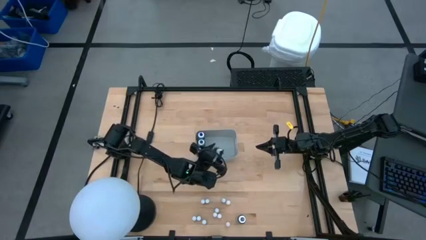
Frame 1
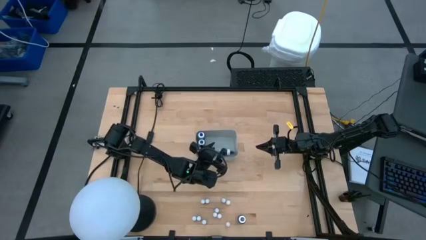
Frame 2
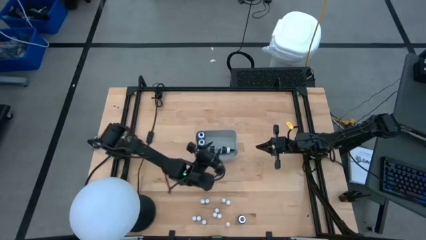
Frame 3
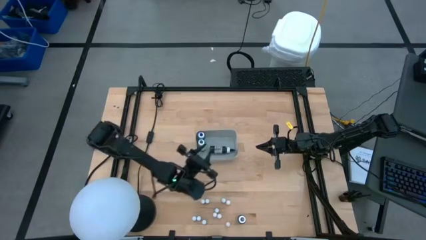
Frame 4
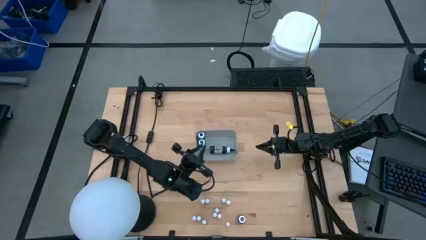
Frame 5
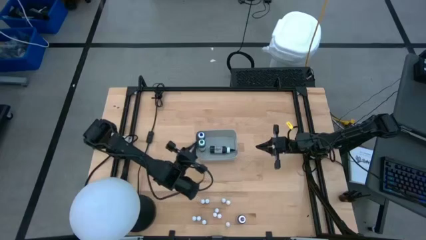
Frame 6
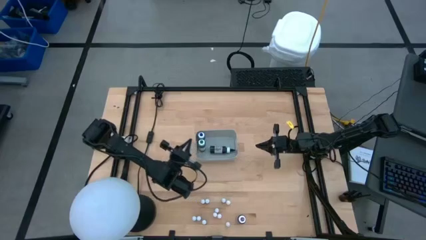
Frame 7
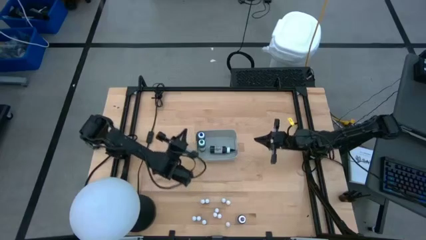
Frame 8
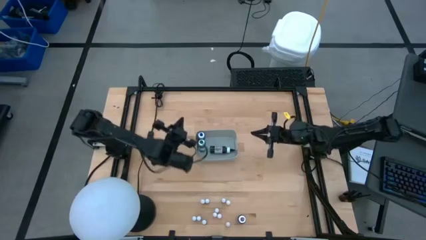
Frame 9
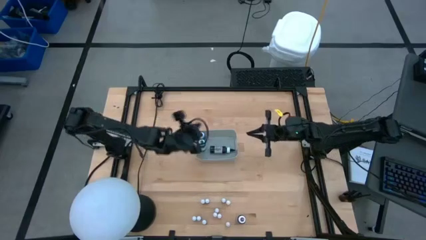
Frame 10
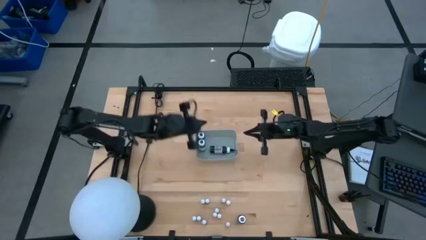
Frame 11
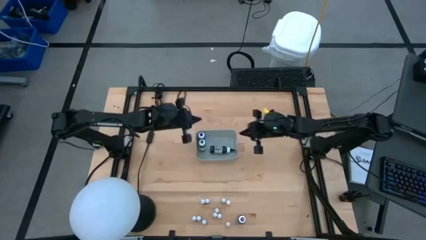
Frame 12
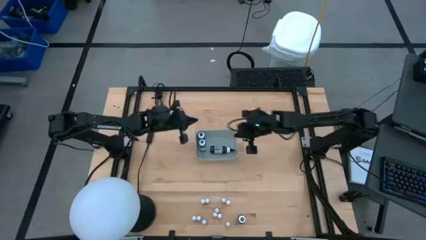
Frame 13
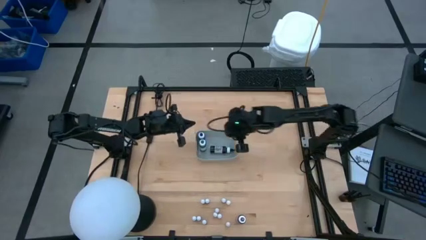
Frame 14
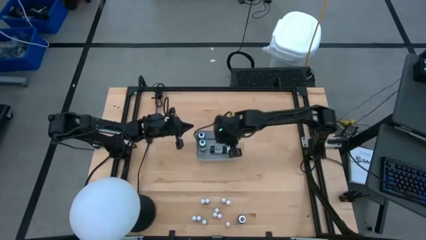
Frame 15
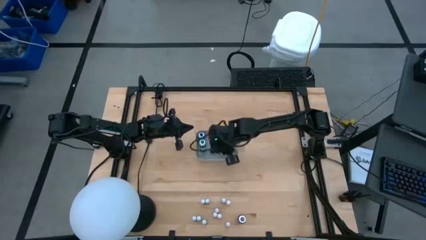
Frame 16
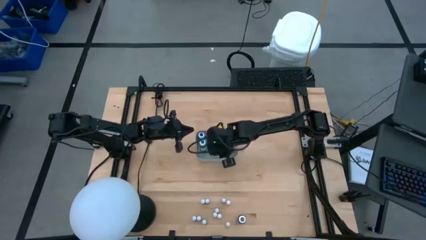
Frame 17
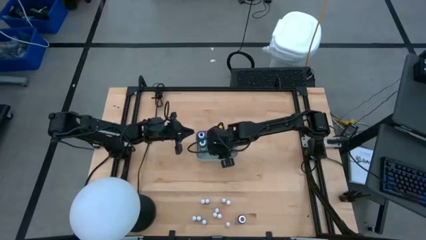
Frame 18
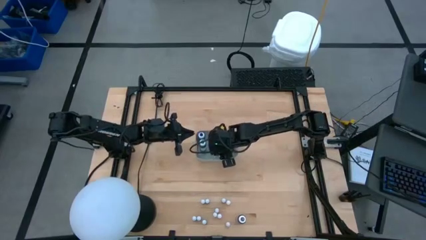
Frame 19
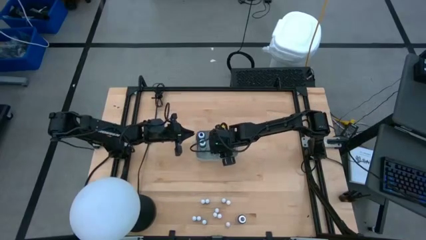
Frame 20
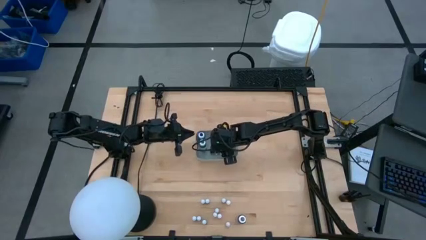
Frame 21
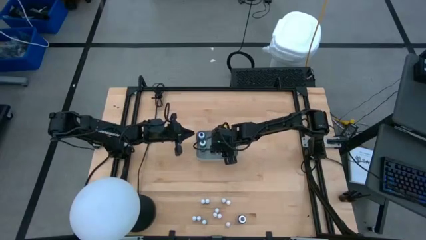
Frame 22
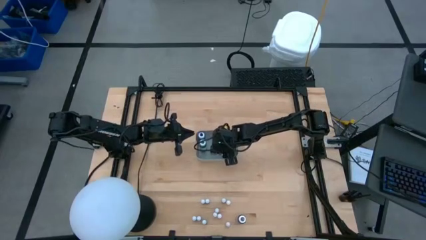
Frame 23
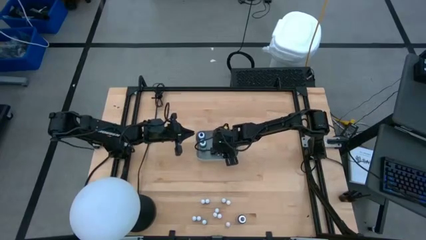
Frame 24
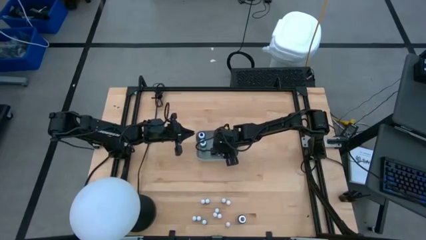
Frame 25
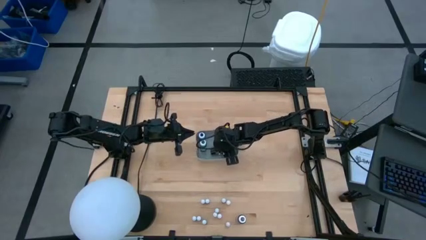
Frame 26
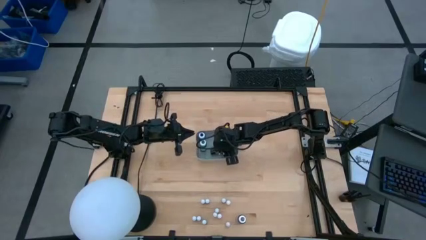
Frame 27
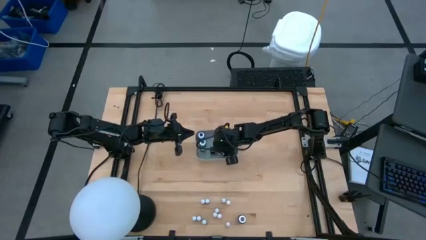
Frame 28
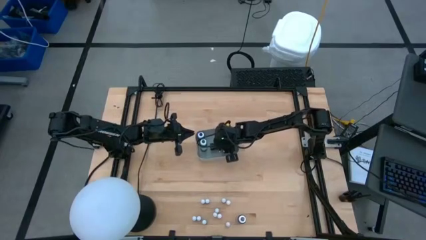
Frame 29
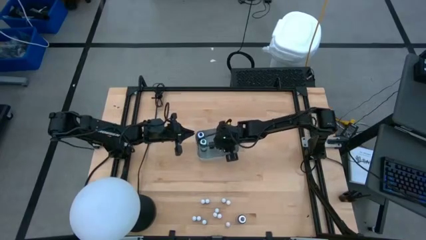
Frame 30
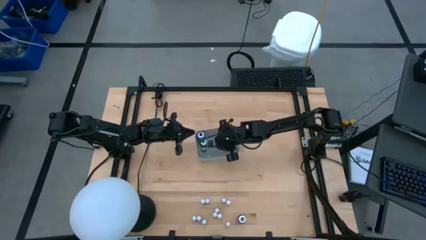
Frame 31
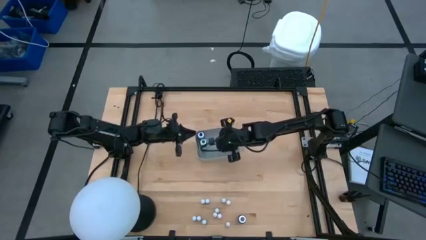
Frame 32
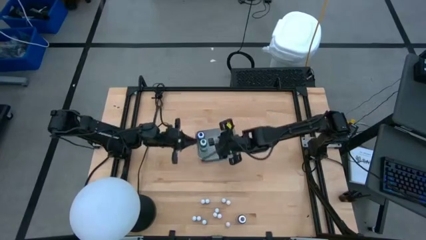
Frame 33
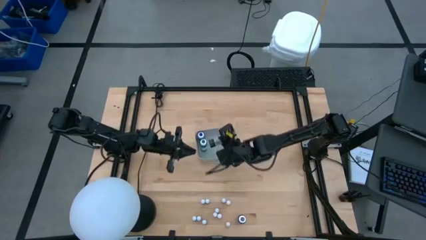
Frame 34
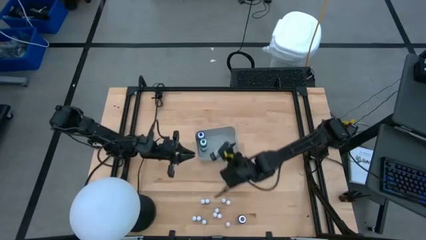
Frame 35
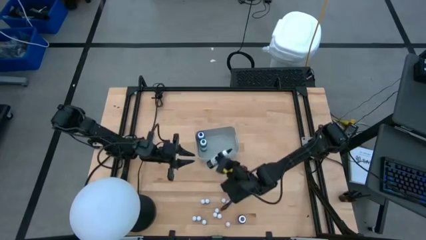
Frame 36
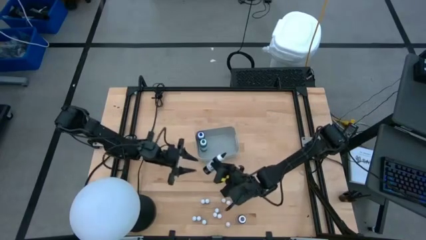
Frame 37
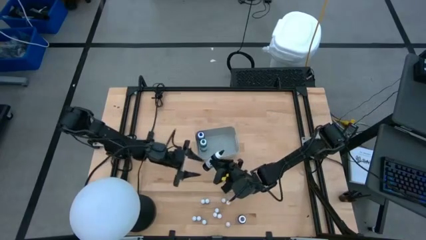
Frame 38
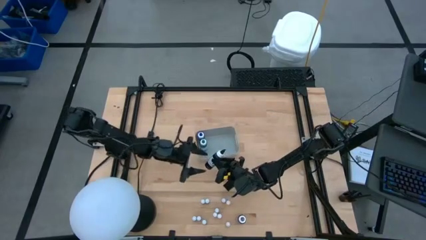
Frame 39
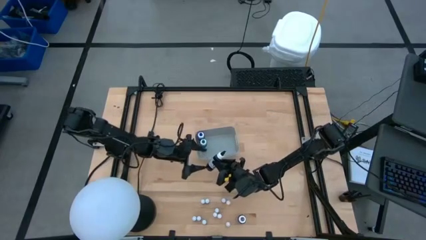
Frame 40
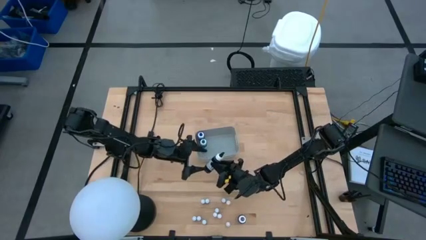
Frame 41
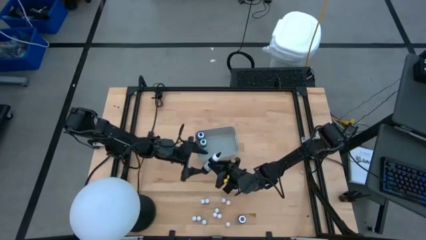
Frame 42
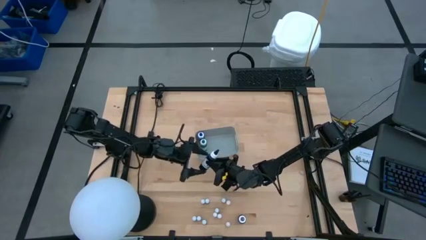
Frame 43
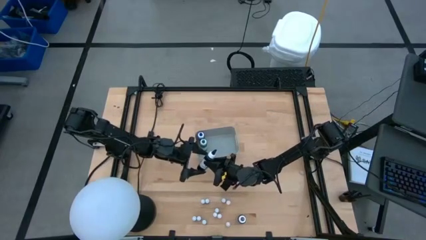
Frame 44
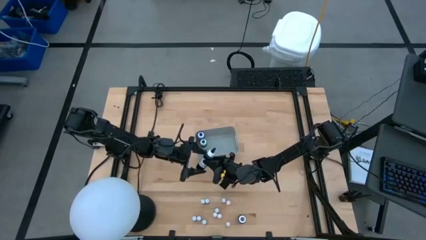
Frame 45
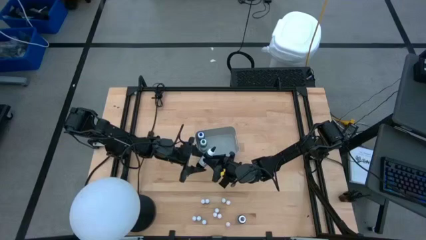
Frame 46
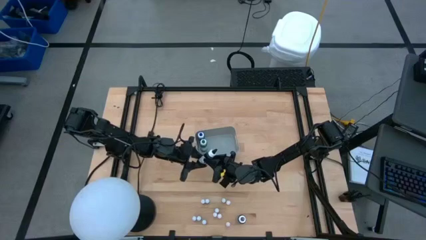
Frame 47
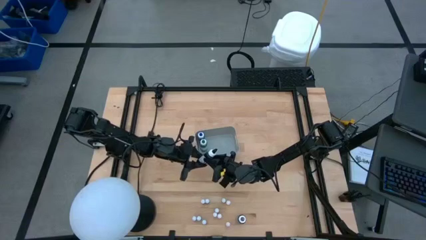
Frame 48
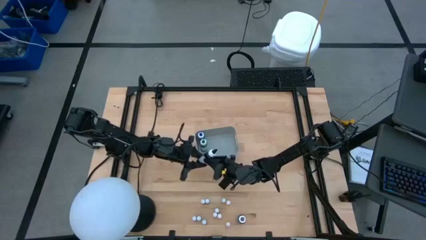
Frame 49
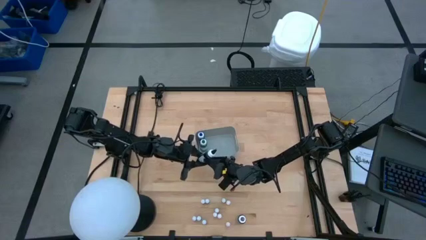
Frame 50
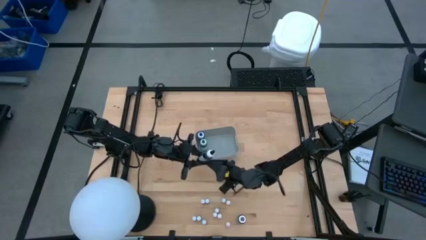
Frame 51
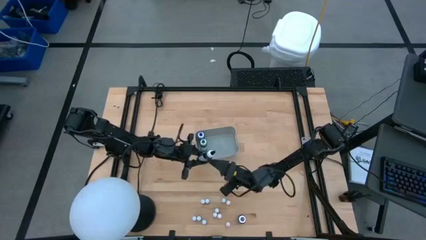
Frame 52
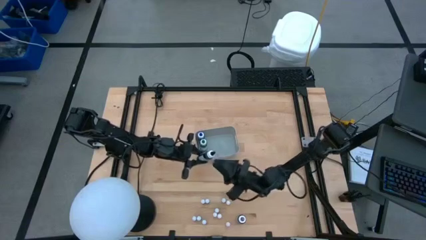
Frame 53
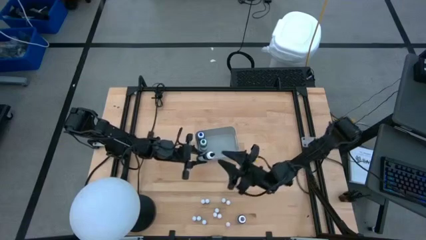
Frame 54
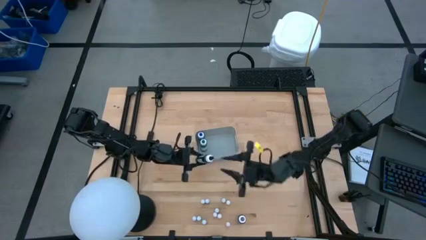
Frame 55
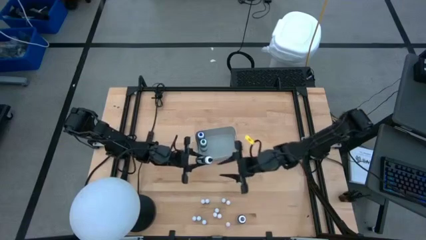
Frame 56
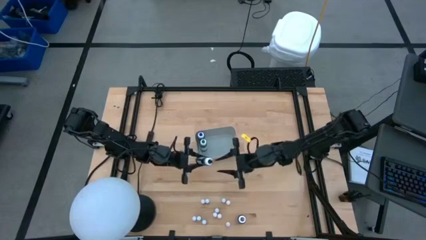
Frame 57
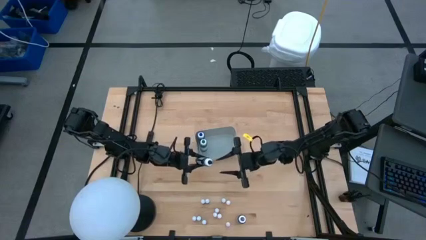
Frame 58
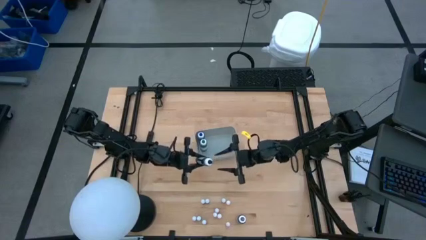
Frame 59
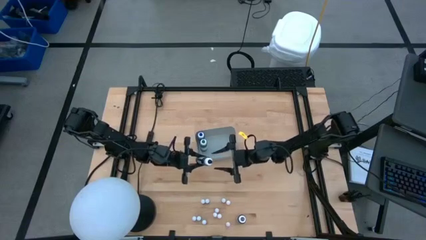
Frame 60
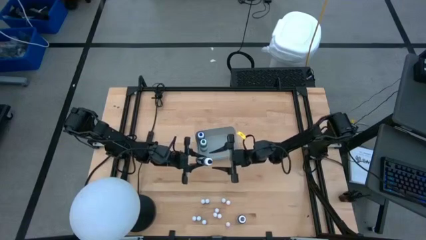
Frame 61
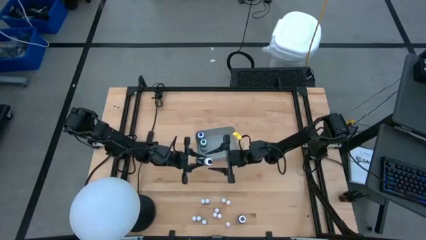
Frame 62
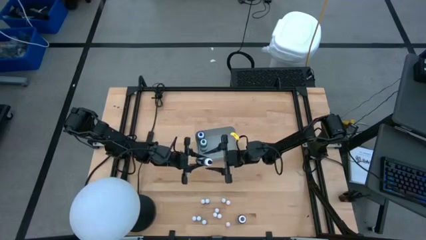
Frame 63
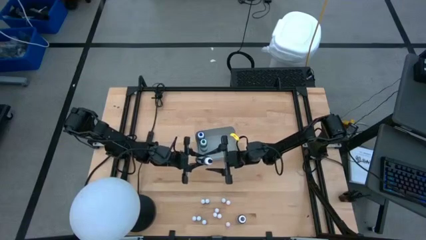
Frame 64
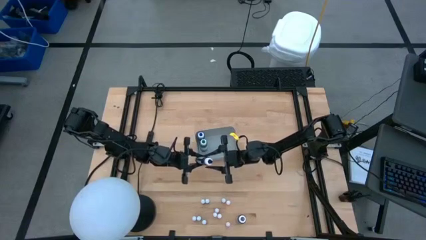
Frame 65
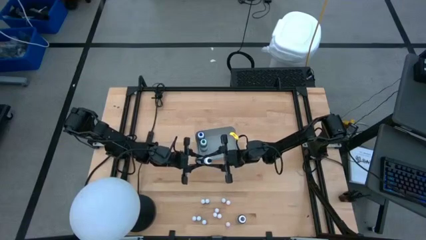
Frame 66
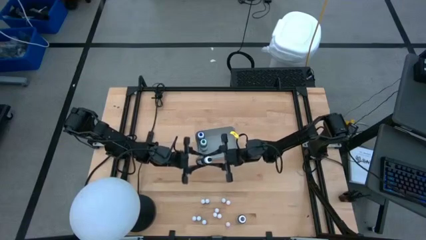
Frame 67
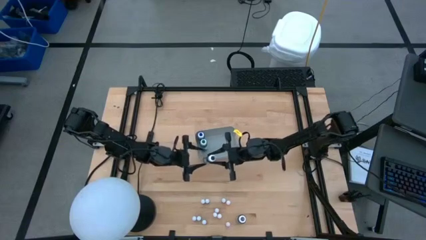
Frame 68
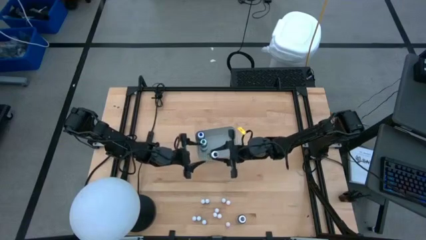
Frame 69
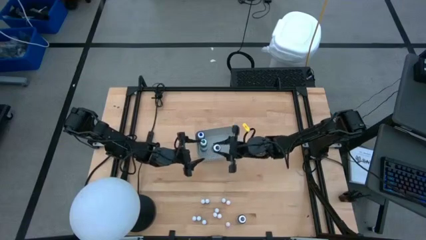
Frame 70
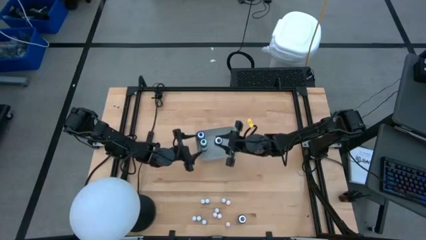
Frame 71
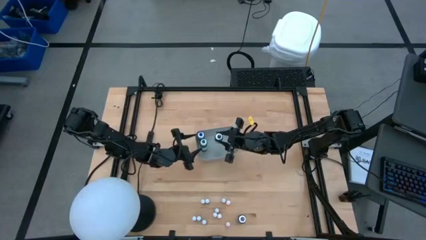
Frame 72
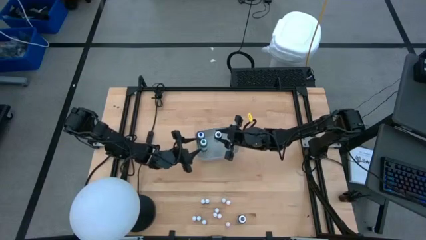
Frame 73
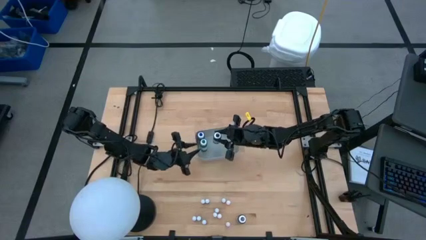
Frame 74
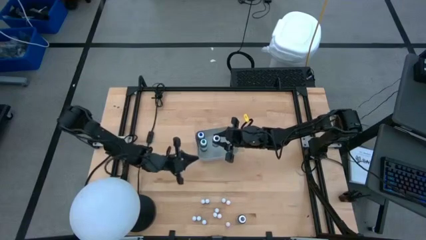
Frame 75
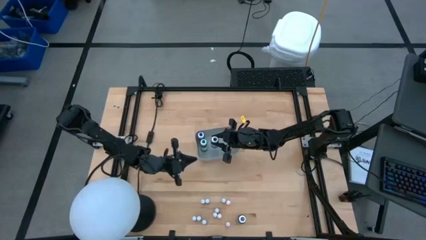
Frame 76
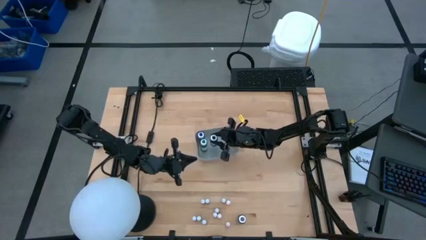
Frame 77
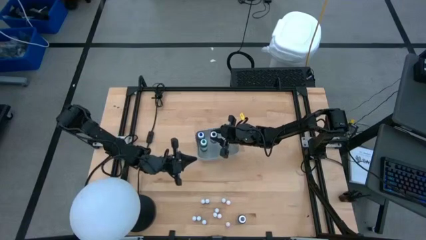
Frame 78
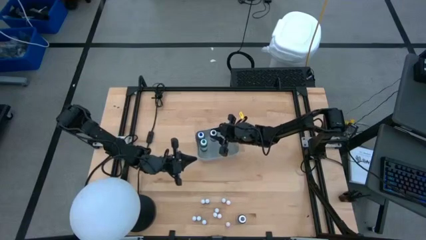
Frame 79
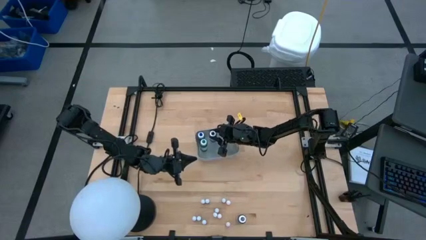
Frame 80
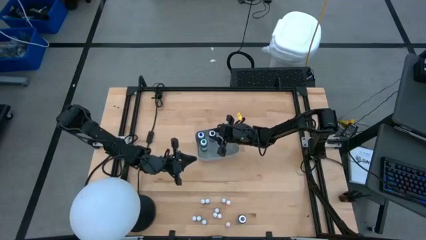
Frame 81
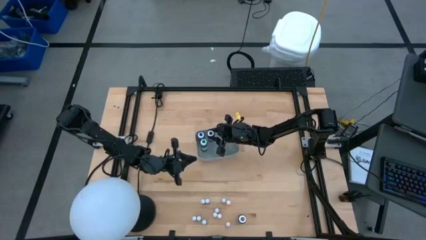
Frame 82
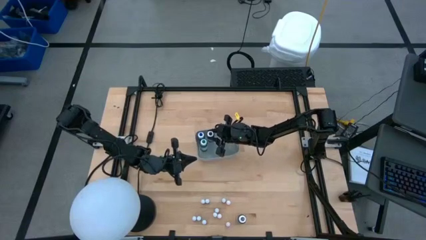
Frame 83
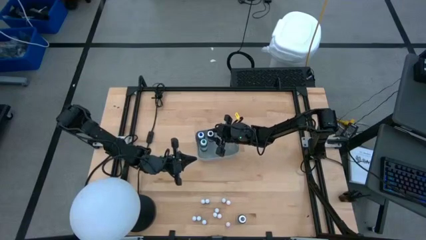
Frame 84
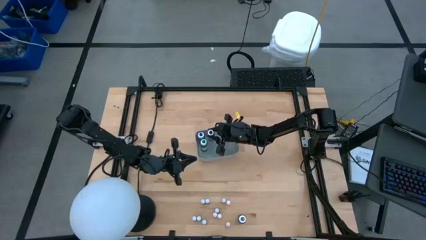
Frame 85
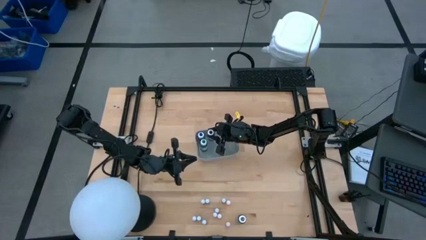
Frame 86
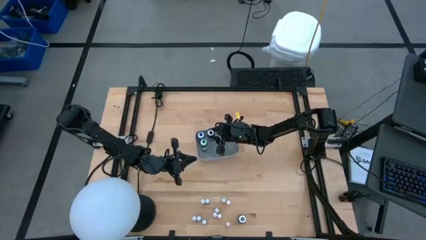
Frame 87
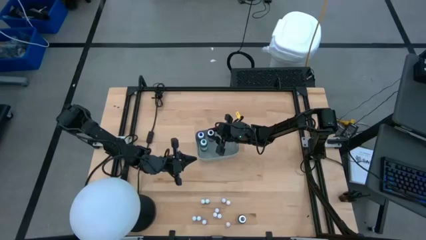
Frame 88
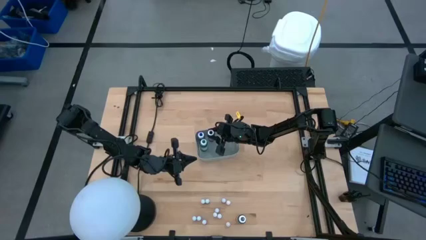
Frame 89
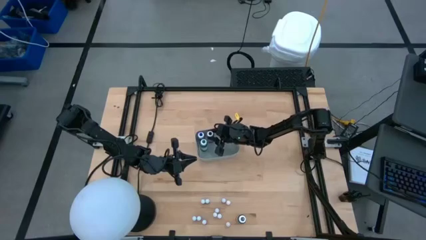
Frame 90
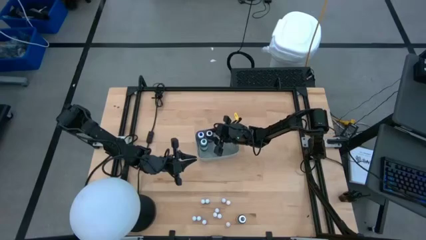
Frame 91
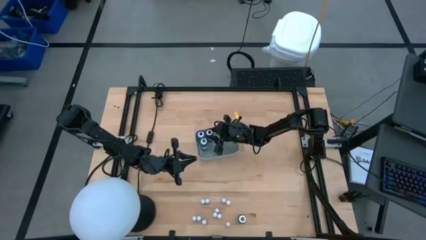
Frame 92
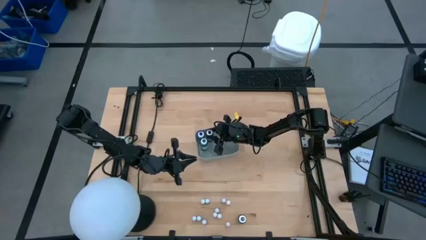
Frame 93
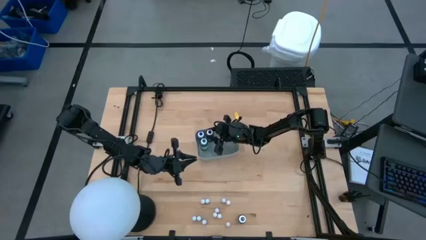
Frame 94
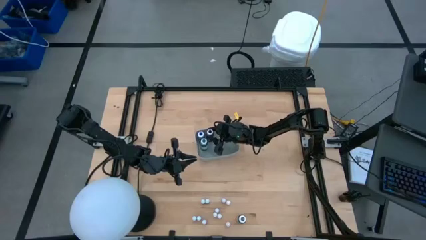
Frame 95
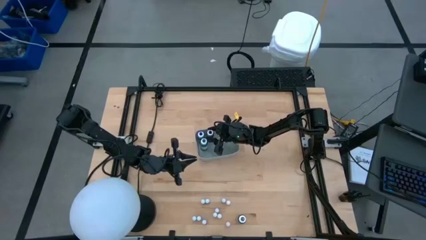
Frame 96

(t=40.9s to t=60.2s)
Task: Pick & Place food coloring
Put the large black food coloring bottle into the gray bin
